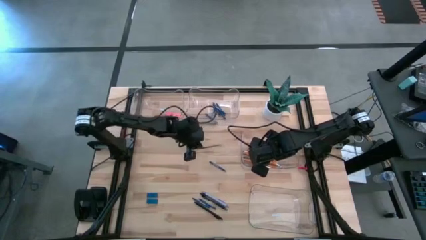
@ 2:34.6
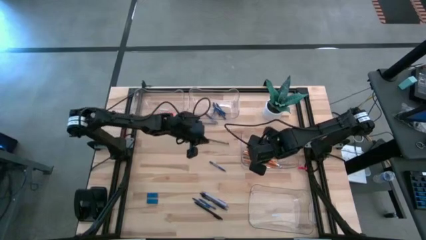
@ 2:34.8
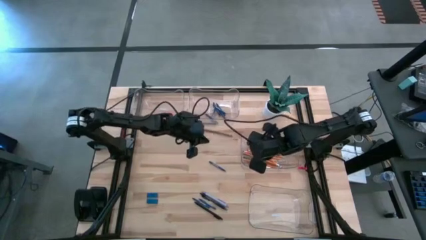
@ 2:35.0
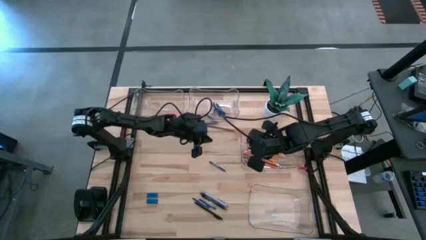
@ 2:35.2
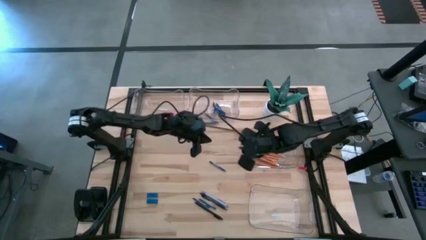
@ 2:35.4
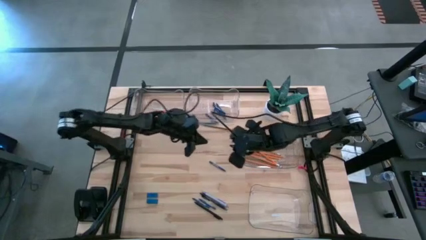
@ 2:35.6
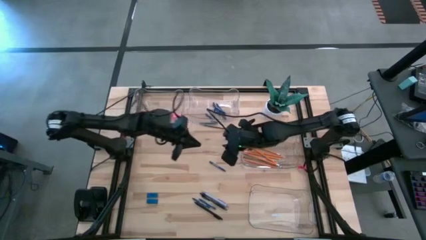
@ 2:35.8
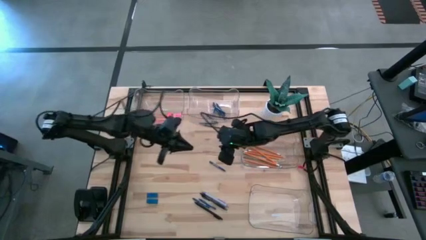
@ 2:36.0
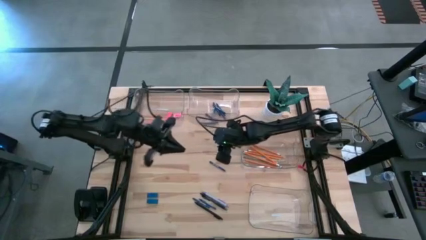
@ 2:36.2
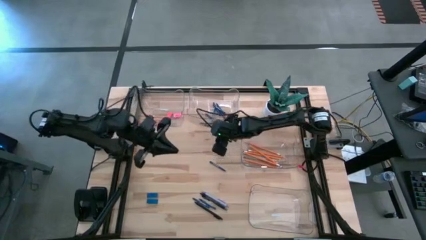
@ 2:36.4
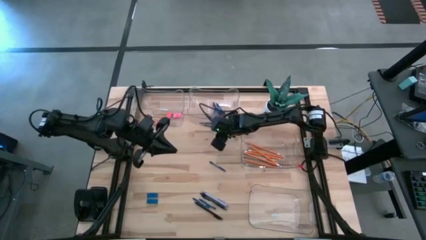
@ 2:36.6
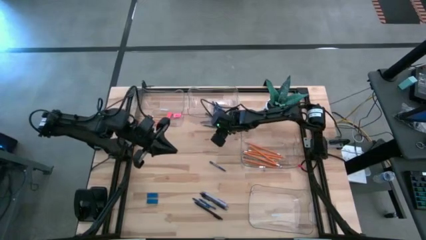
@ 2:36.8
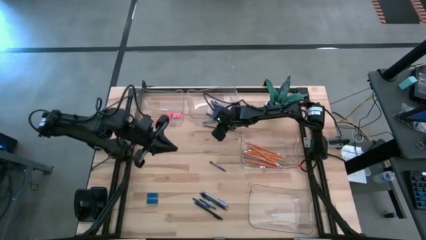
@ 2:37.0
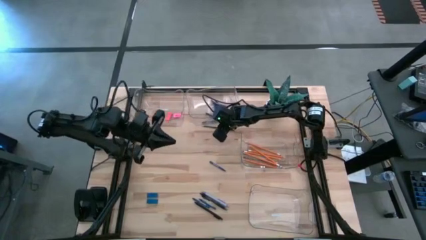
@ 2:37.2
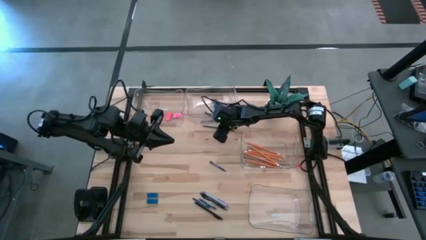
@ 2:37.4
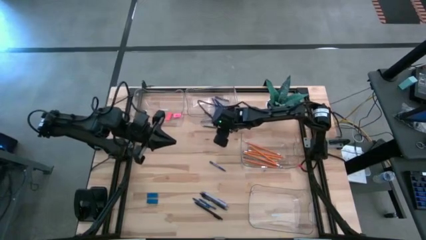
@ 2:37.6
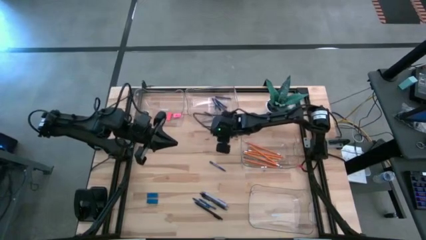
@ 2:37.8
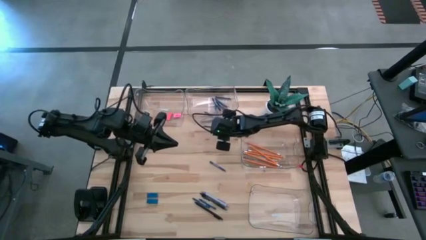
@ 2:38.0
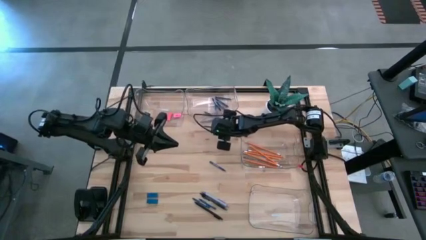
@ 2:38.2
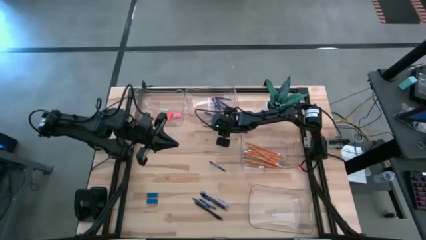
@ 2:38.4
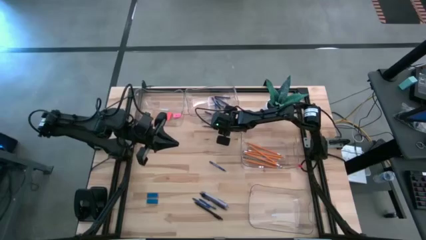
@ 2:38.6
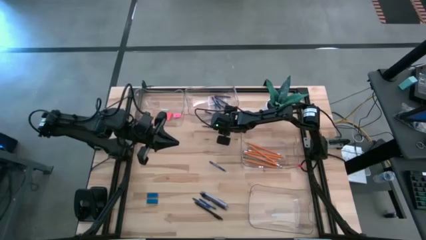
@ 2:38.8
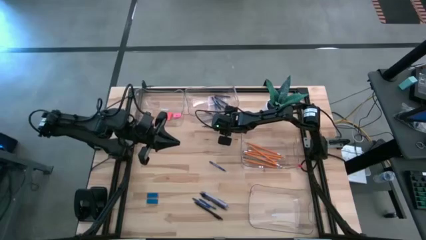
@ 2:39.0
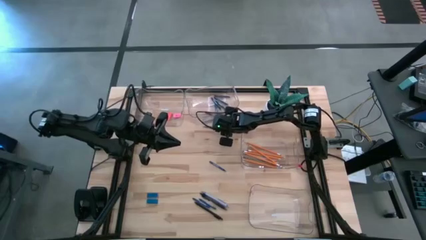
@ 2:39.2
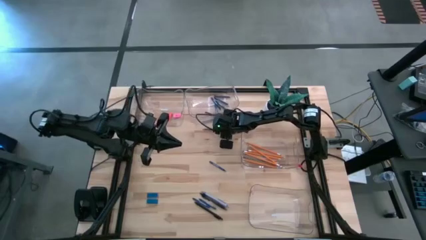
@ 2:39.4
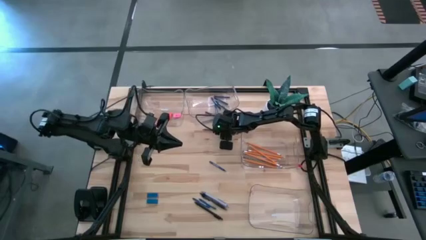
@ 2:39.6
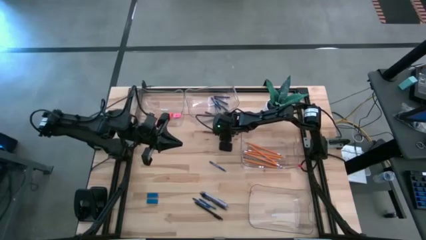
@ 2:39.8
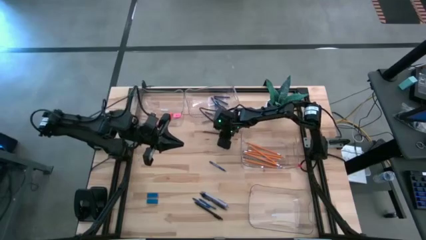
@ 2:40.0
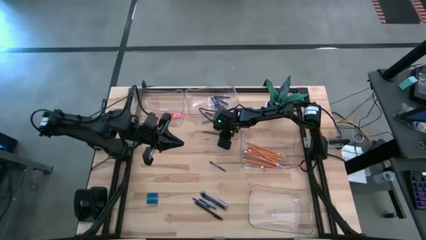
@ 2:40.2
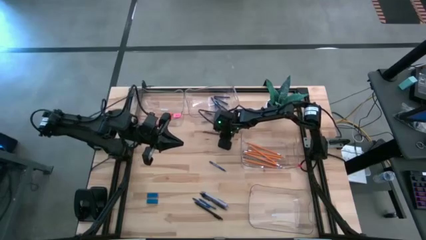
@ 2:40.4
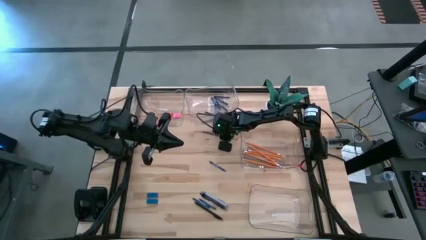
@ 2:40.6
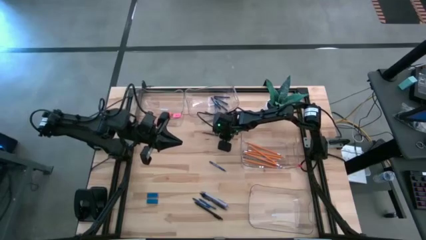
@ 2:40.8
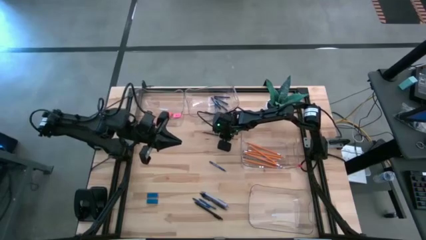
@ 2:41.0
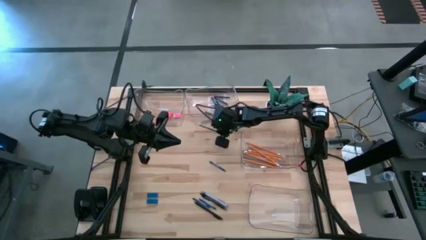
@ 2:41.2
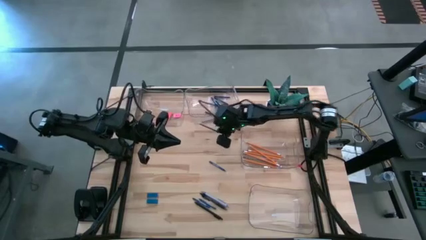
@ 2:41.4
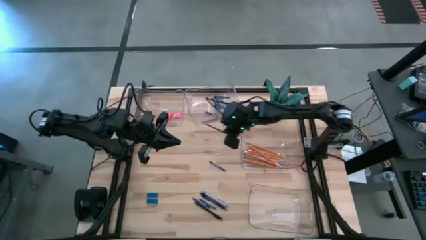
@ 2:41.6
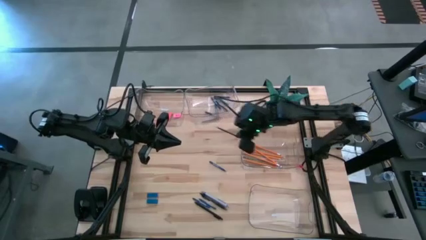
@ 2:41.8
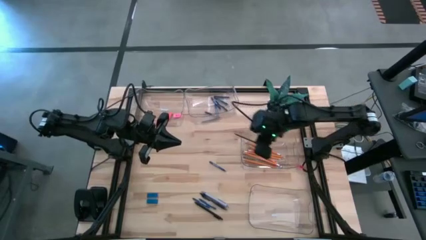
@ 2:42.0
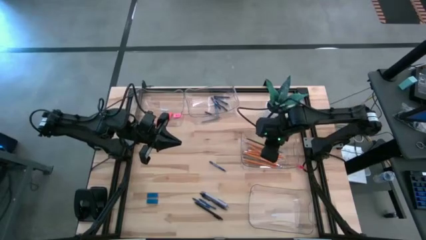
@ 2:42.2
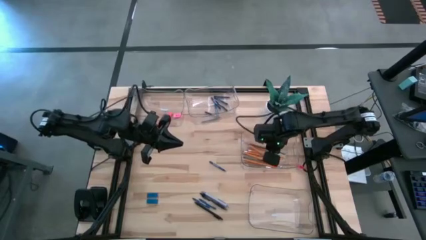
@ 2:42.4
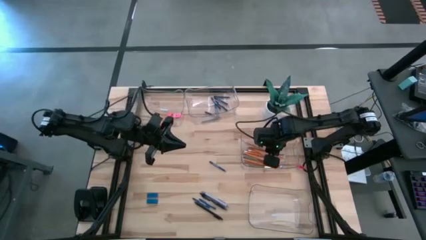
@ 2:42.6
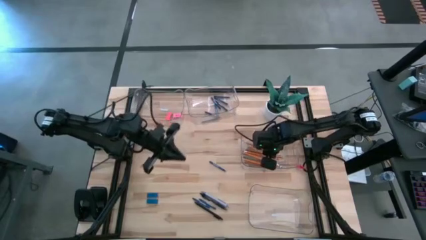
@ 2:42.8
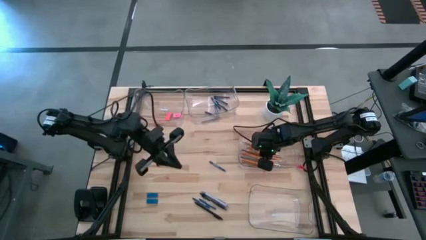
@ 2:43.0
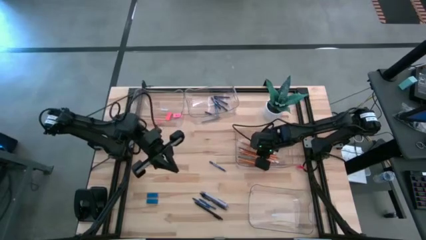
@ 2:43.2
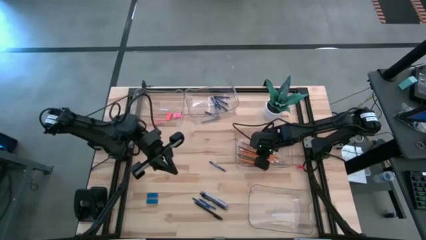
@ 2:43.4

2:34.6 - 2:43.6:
Task: Sort crayons/erasers/pens/pencils in bins
Put the black pencil into the middle transparent bin

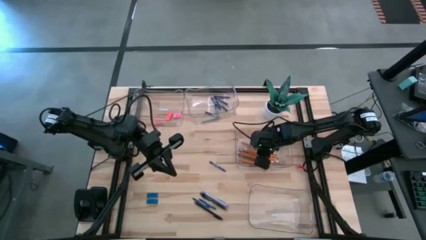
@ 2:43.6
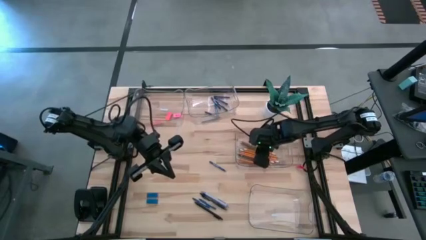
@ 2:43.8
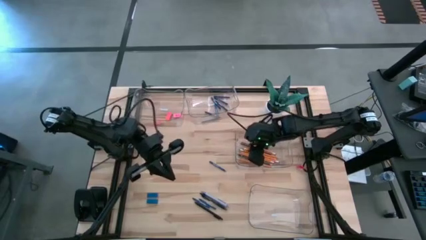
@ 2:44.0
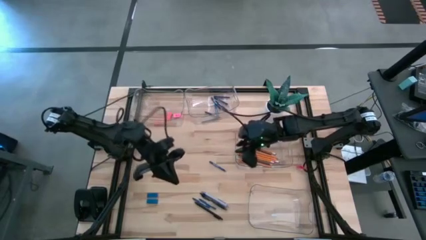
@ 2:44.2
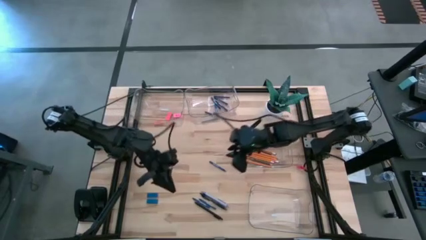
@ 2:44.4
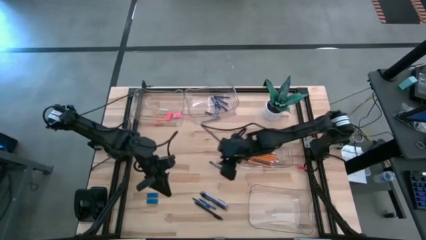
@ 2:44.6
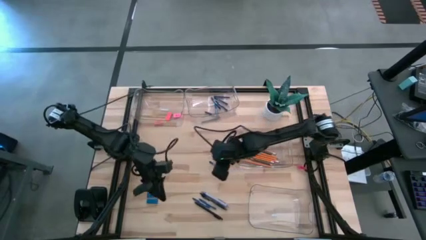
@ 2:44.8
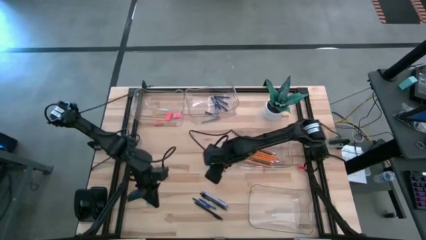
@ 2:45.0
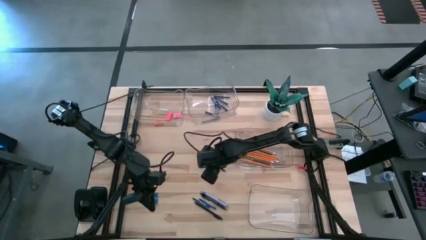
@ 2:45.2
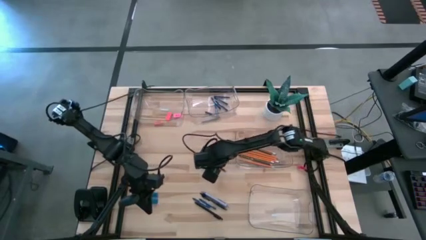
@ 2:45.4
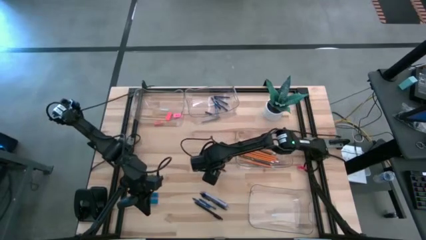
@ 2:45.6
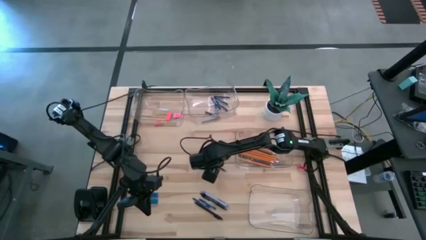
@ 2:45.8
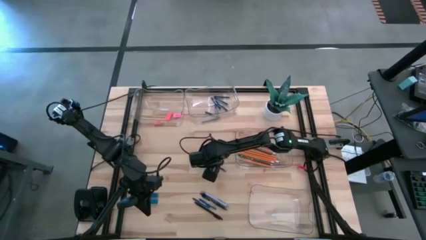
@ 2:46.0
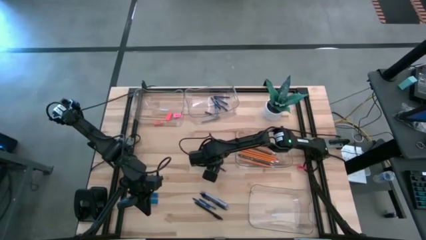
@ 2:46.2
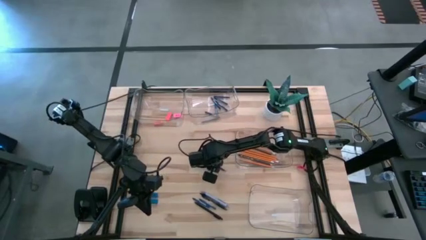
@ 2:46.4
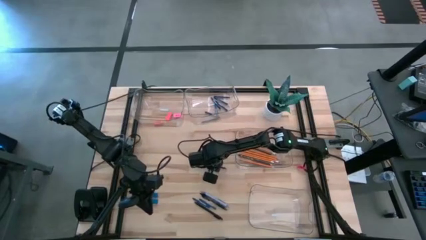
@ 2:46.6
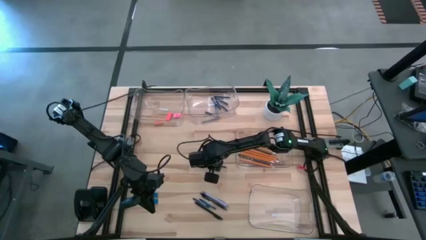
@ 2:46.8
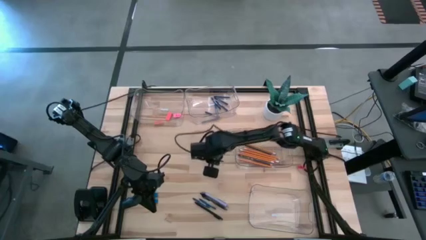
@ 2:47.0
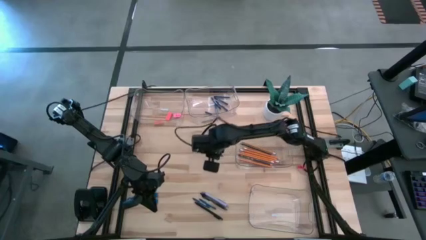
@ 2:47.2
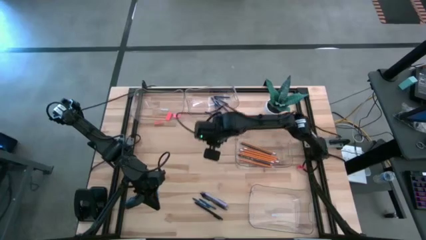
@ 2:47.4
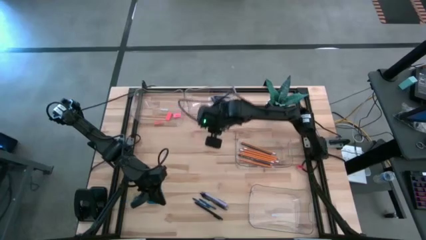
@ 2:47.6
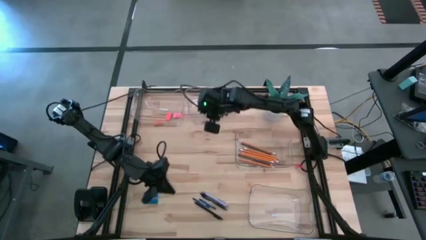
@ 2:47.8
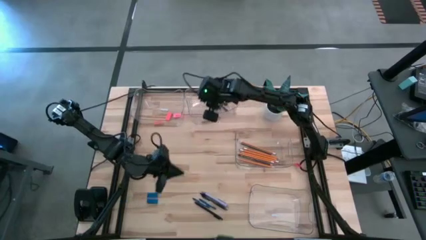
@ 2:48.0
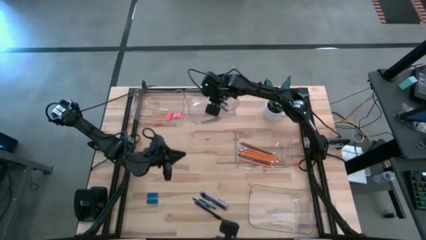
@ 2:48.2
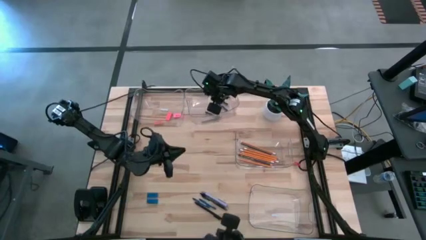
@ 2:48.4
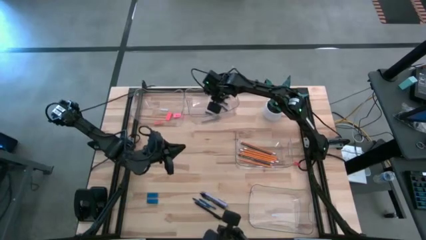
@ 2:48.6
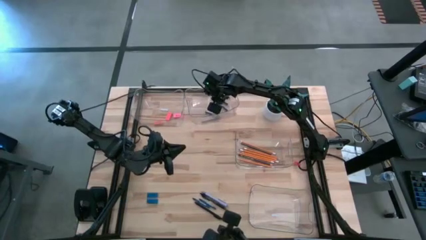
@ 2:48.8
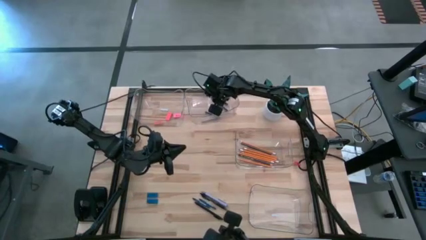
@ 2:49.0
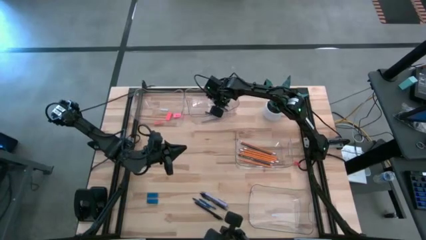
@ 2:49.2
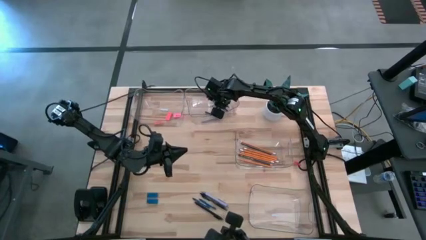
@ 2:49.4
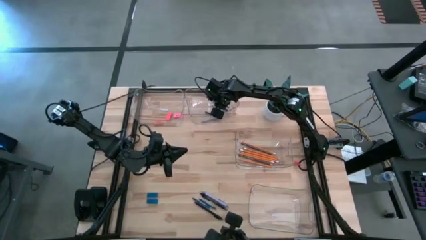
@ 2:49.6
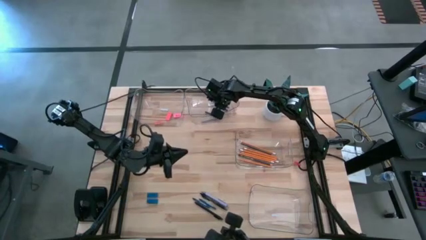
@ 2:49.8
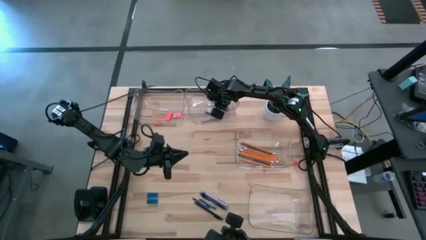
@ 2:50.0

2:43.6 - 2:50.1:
Put the blue crayon into the top right transparent bin
